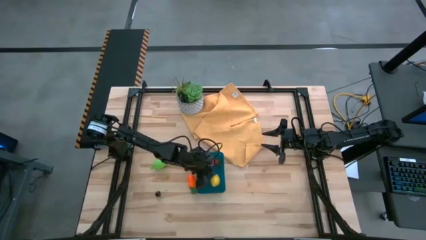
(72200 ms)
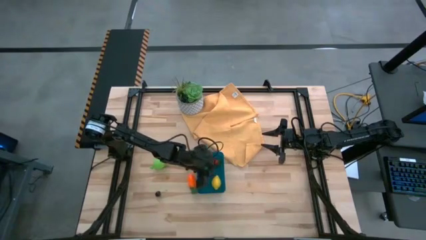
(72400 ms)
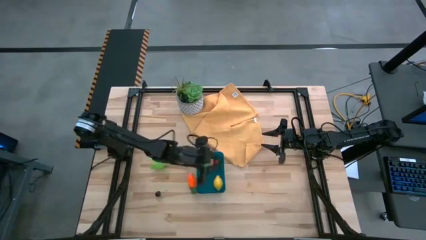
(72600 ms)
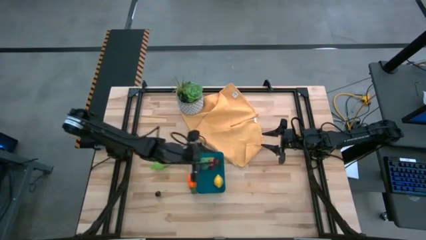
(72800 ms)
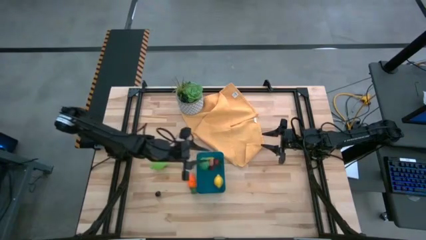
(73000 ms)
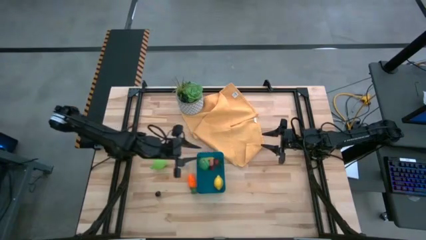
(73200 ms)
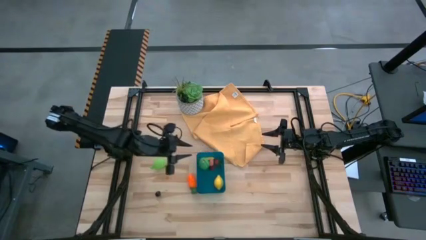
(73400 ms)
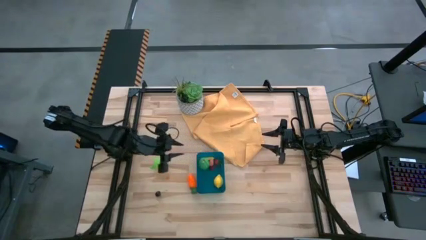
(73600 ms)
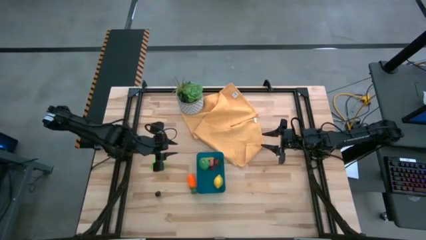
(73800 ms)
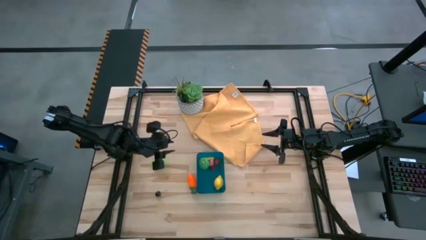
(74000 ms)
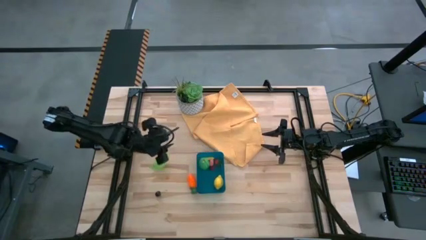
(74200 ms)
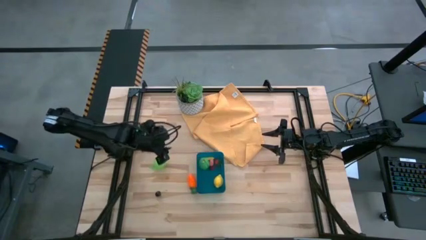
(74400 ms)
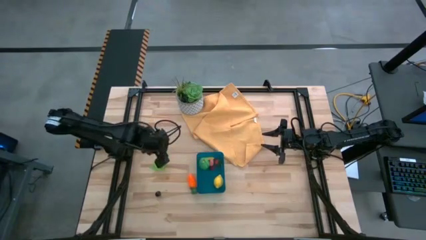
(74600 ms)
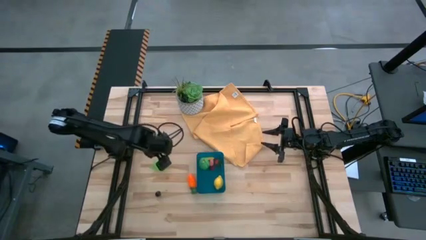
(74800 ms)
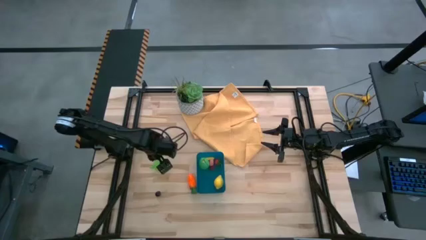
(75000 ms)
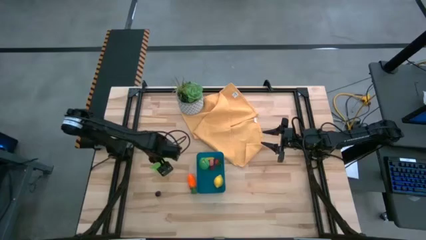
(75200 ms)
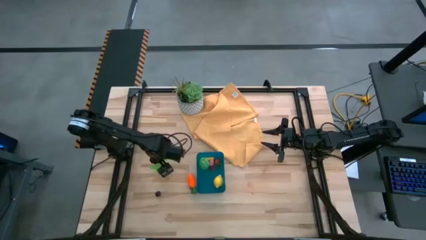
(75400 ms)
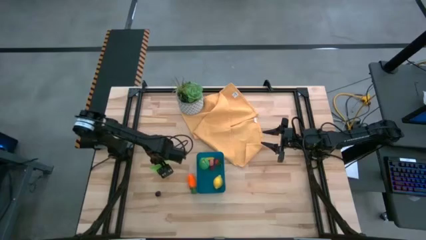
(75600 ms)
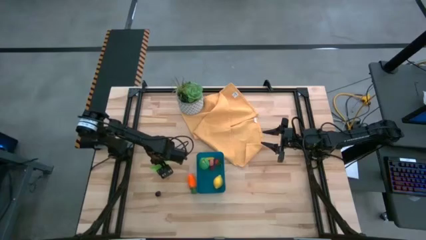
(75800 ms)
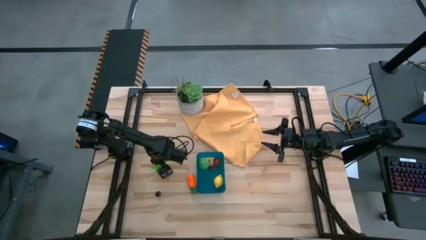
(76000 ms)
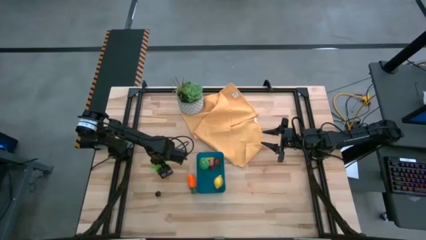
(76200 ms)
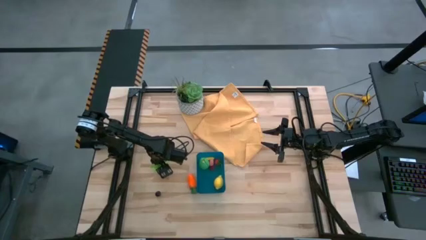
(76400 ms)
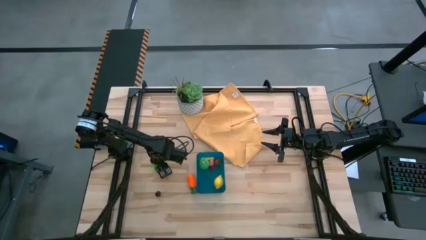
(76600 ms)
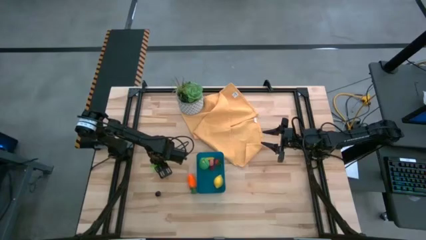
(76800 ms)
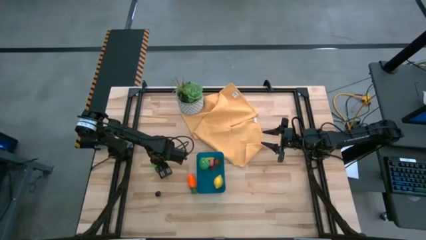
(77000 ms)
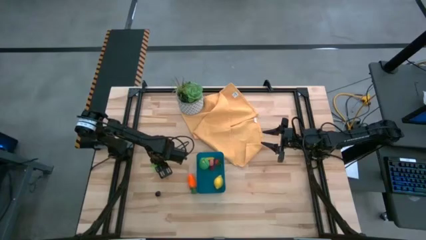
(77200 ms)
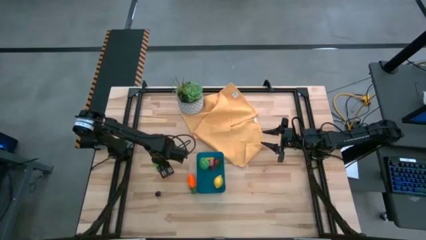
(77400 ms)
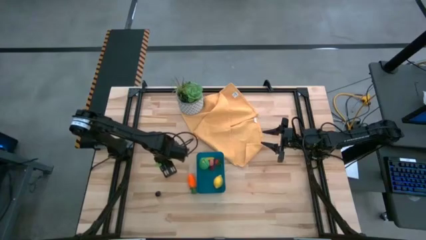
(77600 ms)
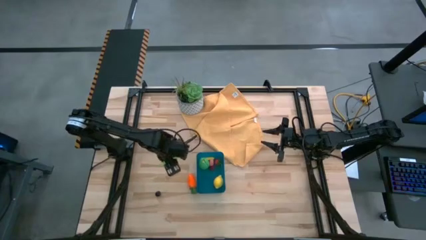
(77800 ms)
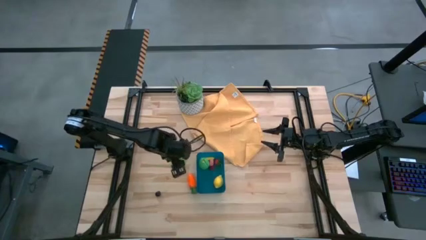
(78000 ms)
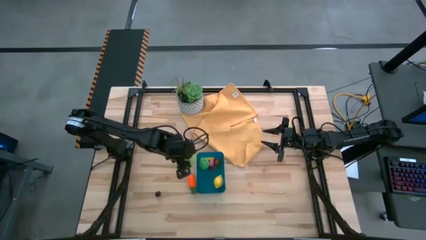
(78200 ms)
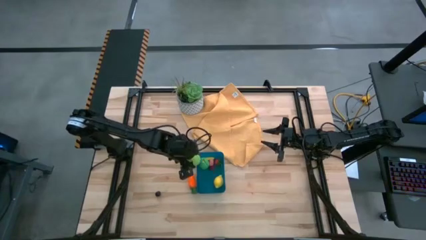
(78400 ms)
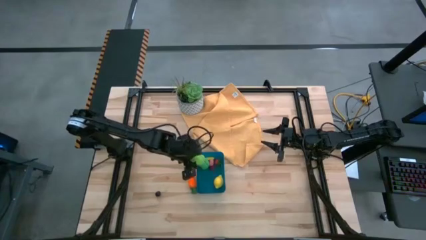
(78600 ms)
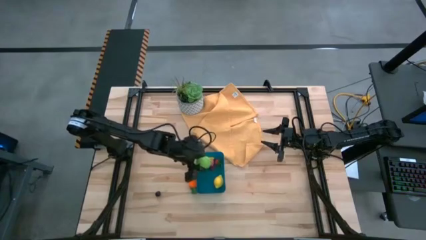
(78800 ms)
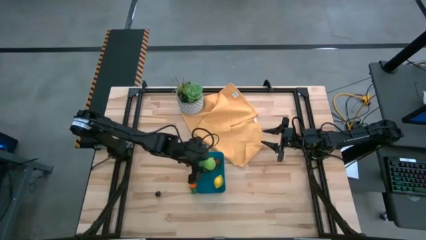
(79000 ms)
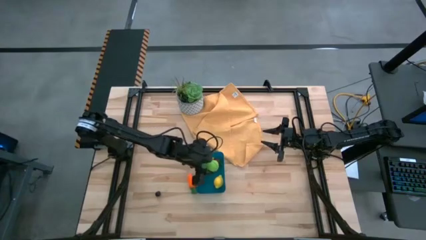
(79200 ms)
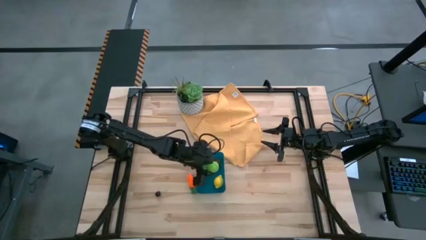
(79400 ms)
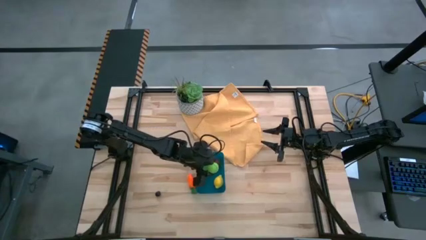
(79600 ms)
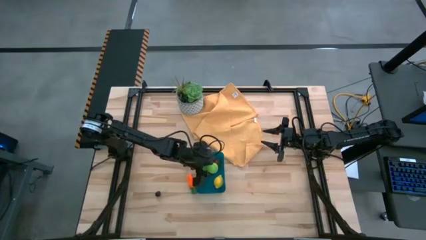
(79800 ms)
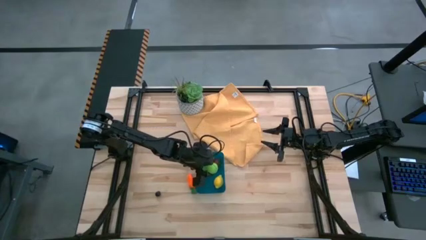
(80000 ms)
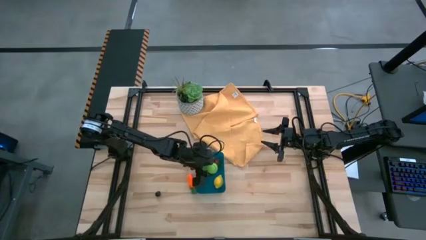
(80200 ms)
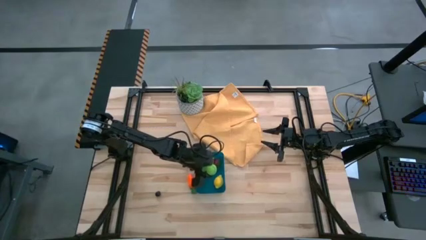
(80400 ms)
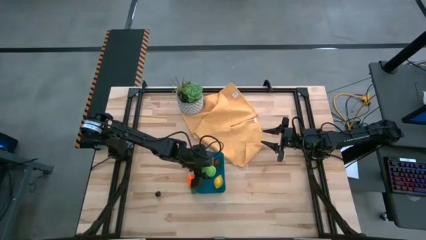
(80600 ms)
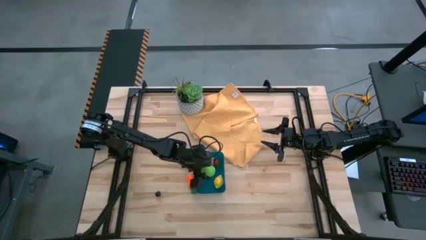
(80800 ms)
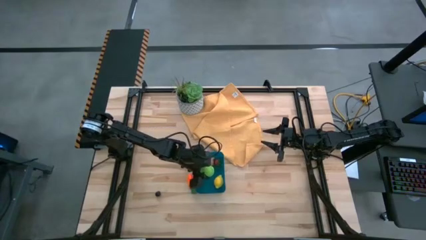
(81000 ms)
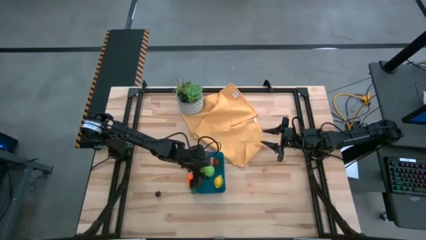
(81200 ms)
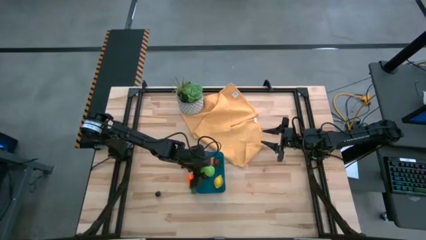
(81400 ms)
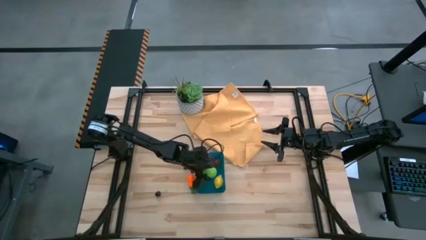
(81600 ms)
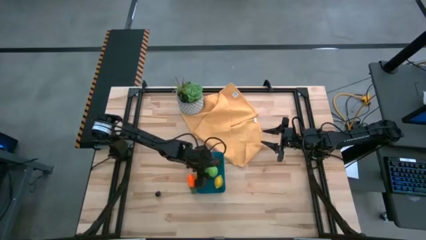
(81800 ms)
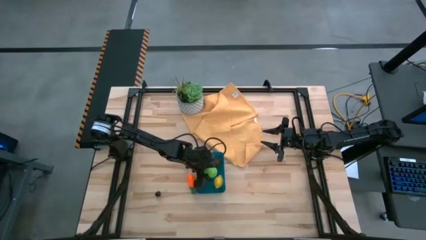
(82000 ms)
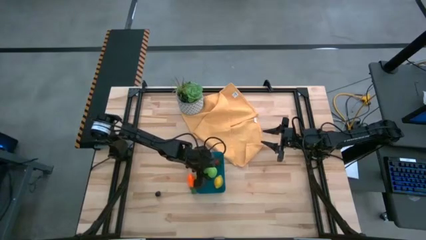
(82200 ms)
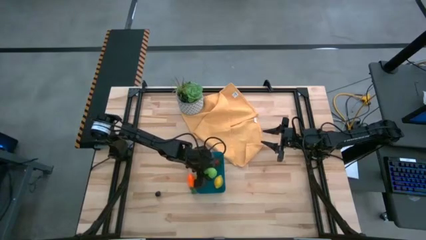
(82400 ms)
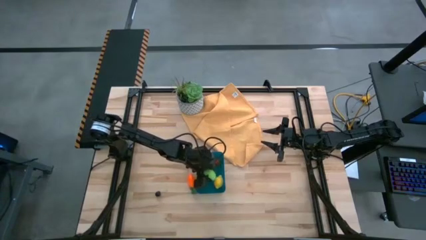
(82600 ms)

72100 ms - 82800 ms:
Task: Pick and placing Produce into tupperware
Put the melon into the bin

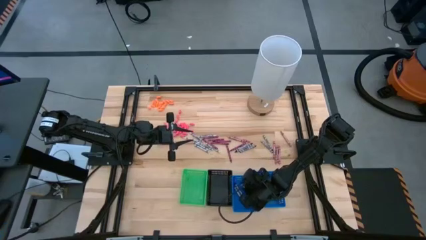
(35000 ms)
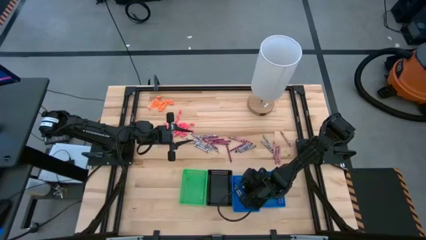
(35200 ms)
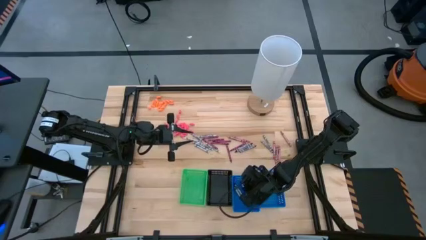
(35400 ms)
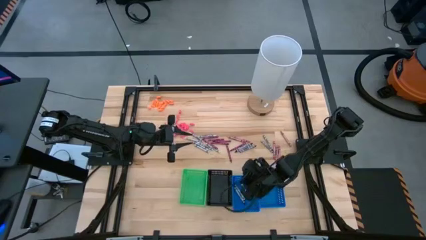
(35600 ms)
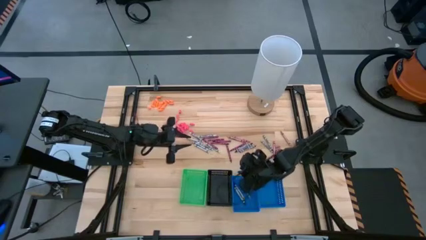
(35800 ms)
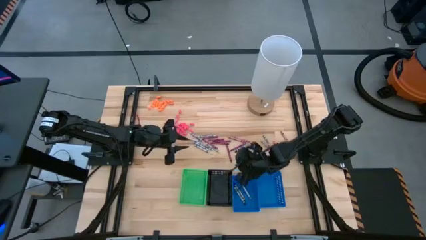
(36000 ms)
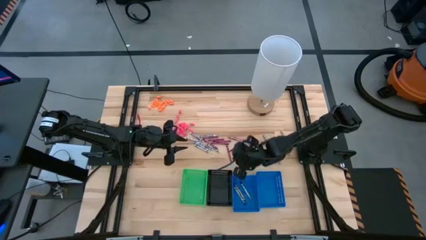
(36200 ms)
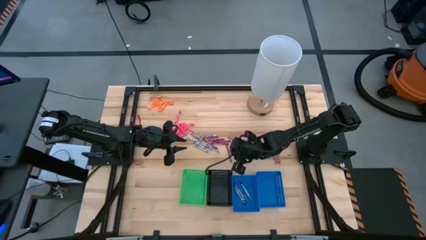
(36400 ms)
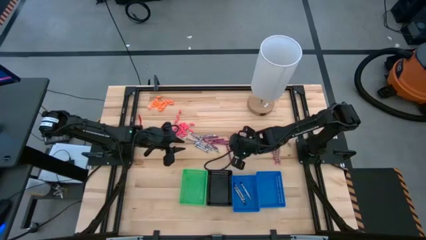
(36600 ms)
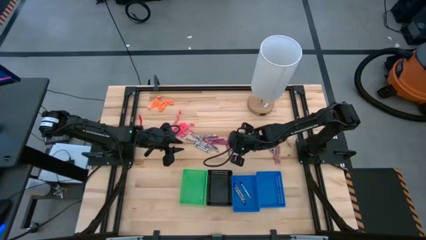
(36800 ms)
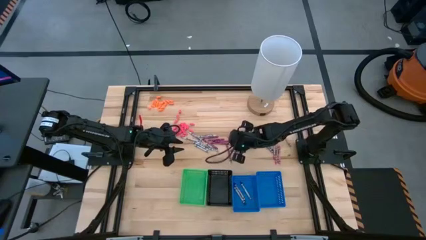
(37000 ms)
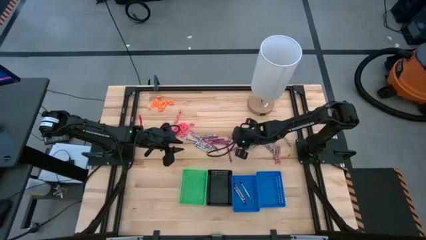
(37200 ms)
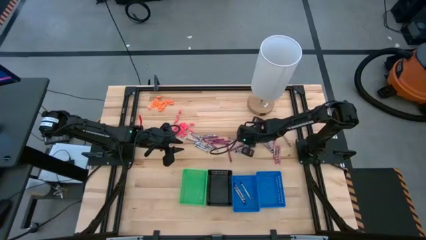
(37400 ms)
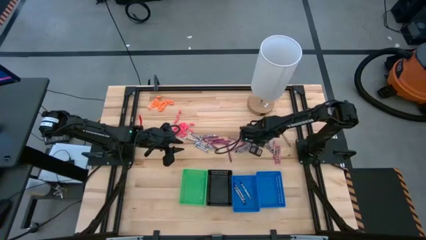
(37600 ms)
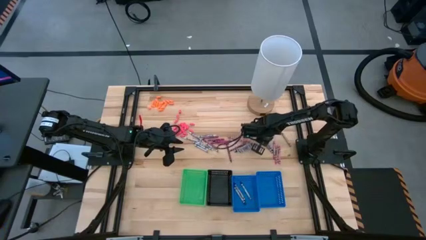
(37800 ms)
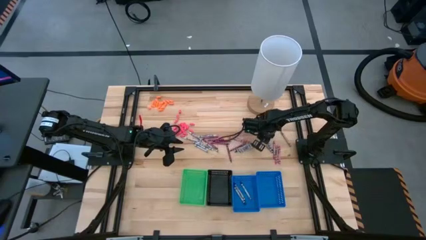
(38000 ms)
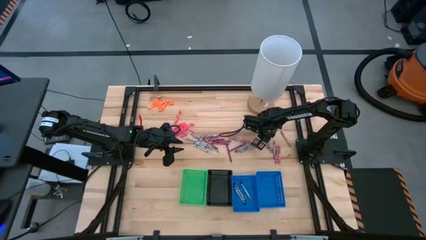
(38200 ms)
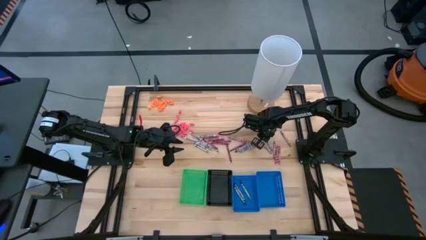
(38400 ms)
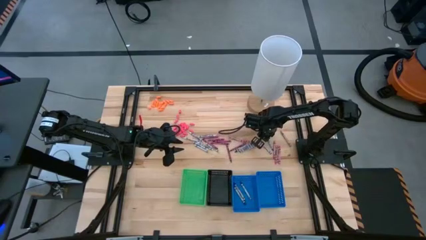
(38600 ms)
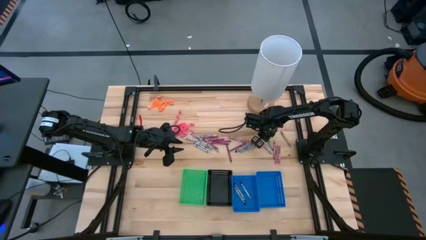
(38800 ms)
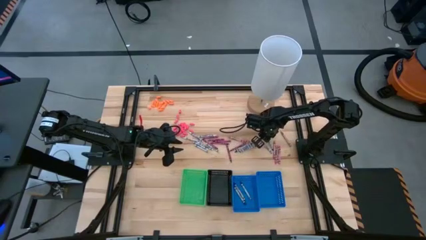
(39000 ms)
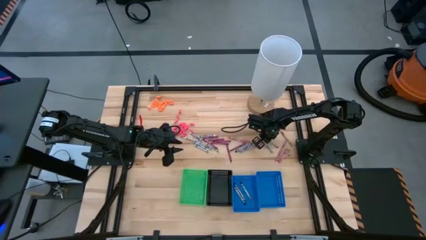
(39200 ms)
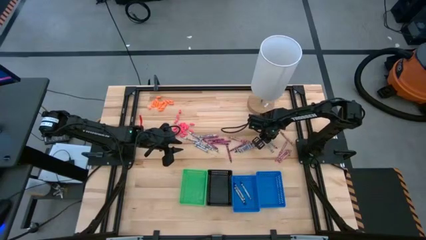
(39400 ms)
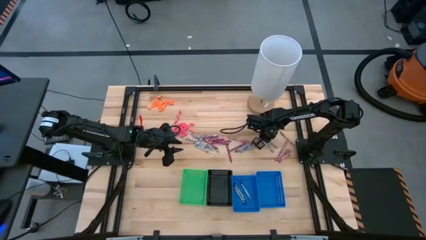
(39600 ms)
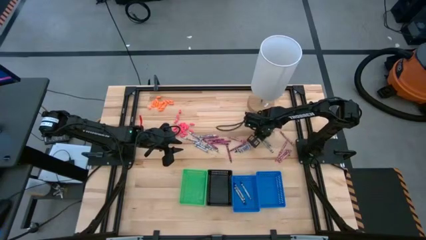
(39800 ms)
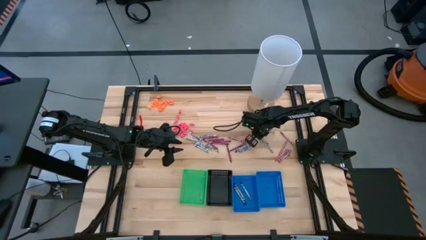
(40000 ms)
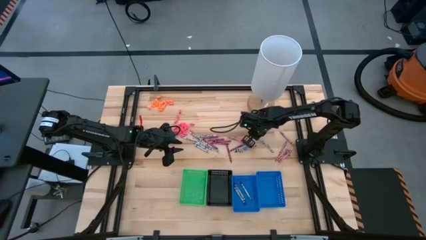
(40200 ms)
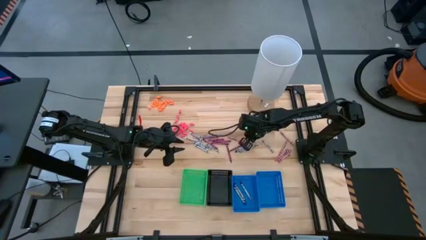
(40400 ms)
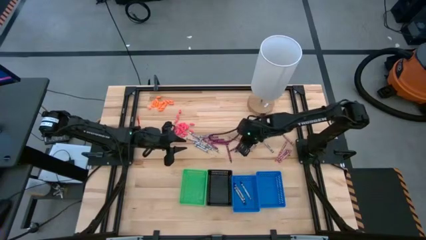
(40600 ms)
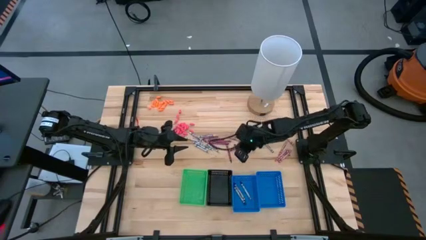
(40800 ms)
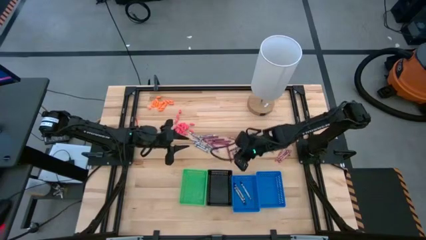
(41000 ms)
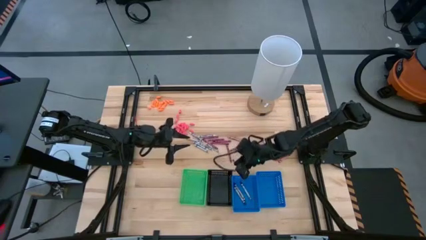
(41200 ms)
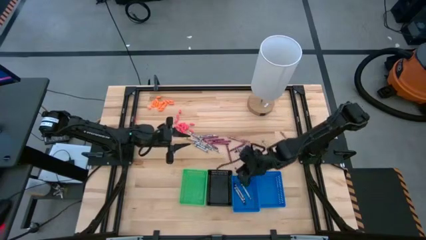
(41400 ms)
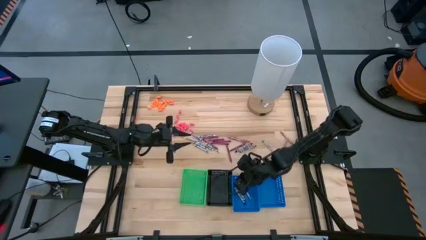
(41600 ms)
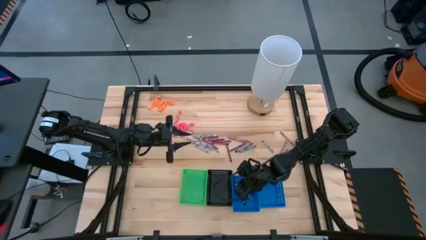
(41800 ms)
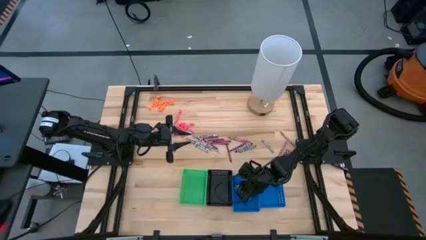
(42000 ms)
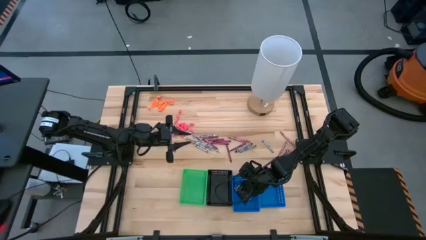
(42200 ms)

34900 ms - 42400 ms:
Task: Sort crayons
Put the black crayon into the left blue bin
